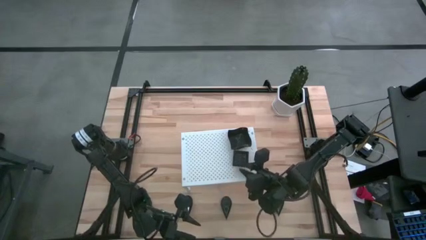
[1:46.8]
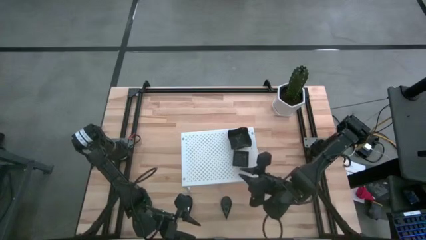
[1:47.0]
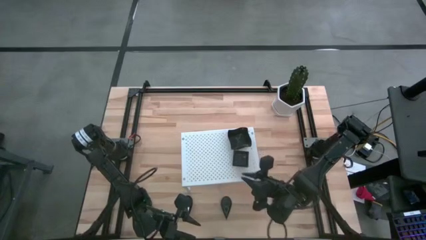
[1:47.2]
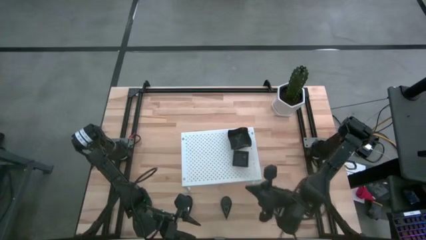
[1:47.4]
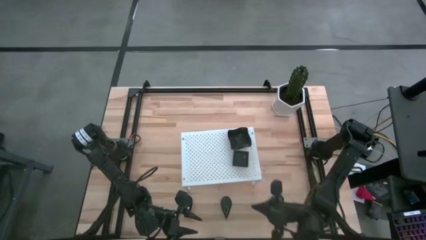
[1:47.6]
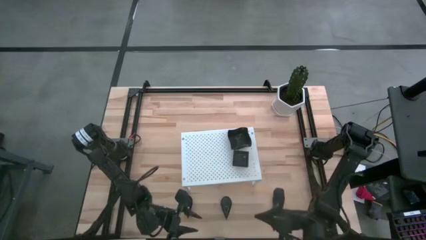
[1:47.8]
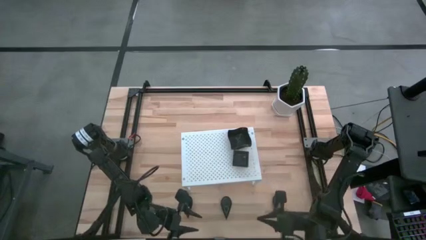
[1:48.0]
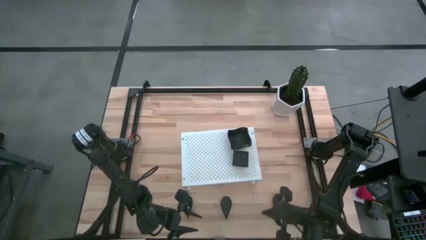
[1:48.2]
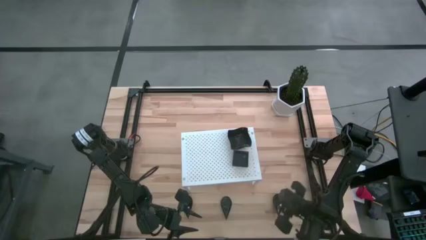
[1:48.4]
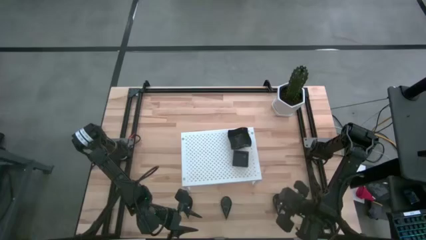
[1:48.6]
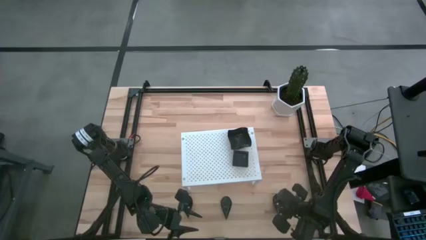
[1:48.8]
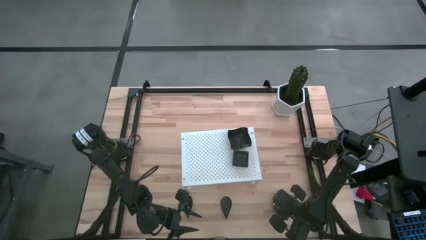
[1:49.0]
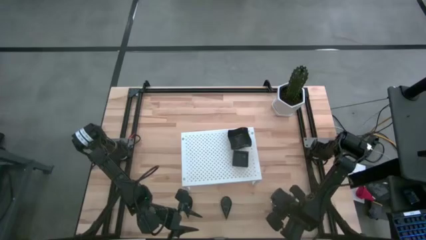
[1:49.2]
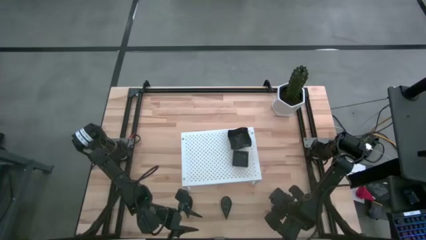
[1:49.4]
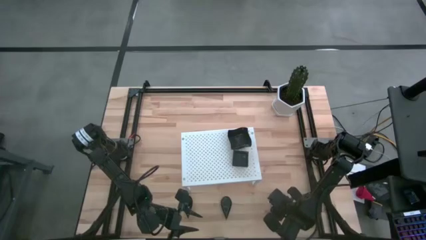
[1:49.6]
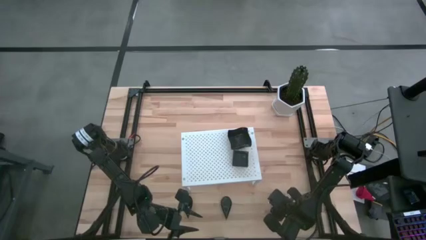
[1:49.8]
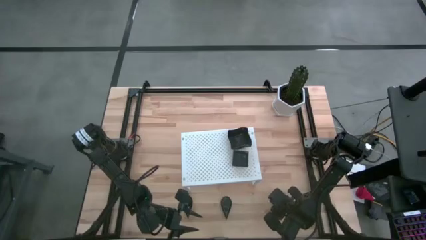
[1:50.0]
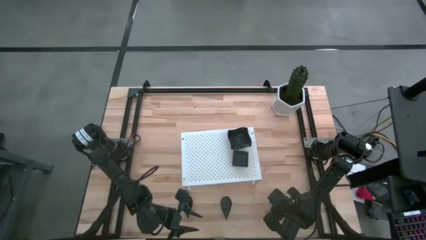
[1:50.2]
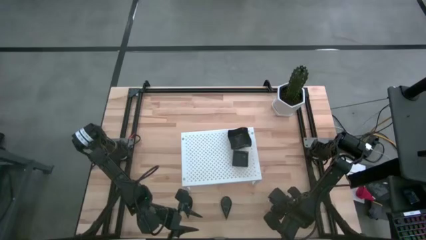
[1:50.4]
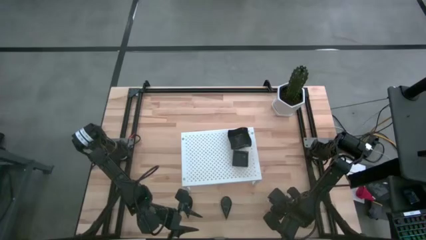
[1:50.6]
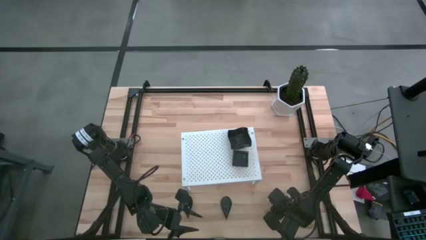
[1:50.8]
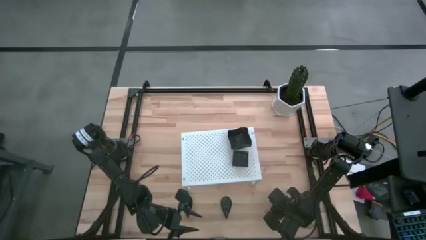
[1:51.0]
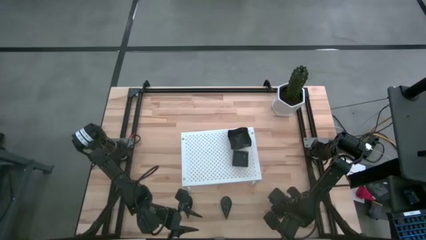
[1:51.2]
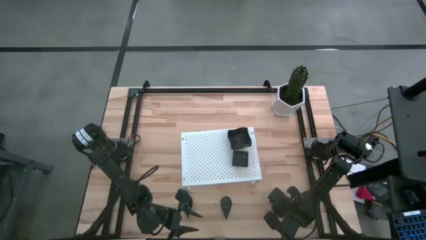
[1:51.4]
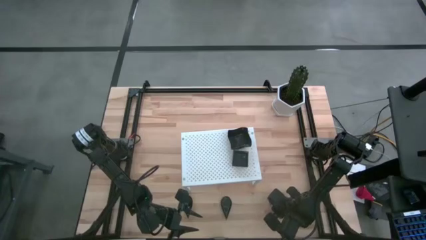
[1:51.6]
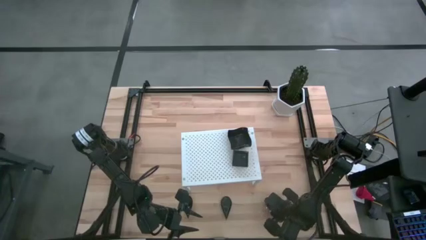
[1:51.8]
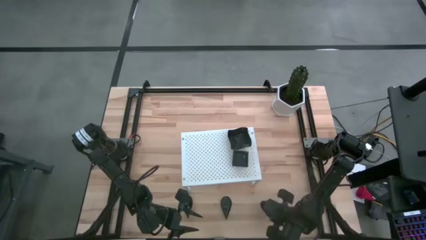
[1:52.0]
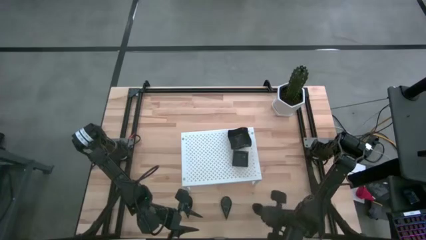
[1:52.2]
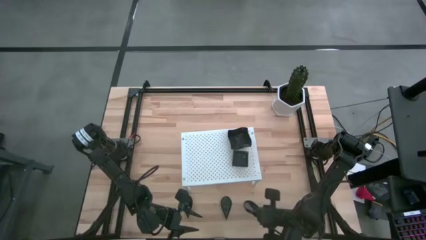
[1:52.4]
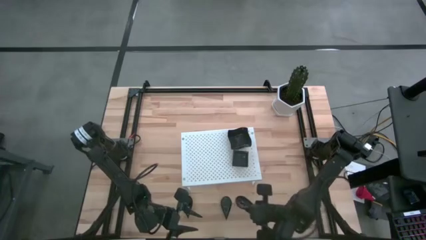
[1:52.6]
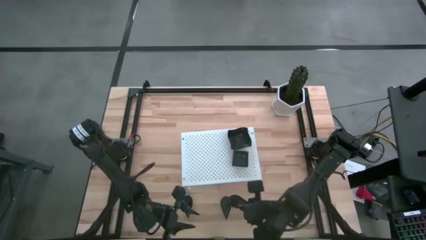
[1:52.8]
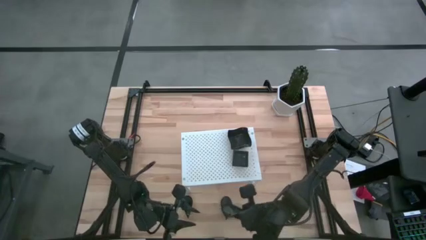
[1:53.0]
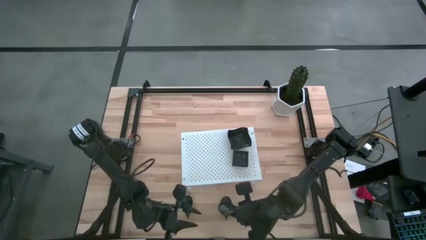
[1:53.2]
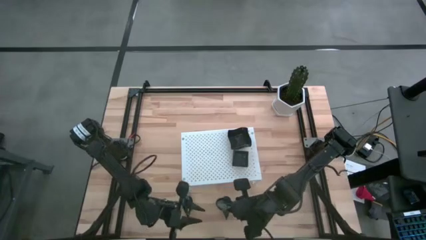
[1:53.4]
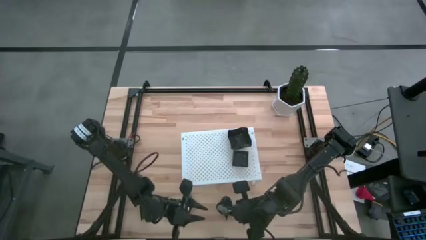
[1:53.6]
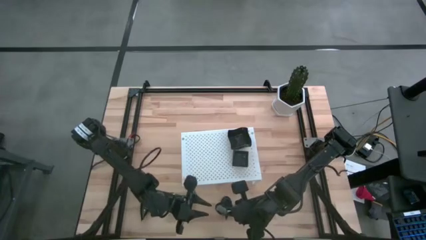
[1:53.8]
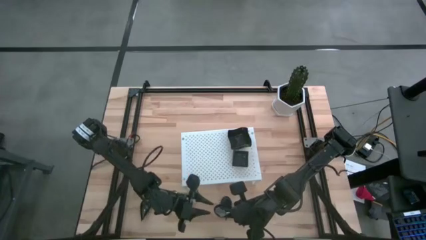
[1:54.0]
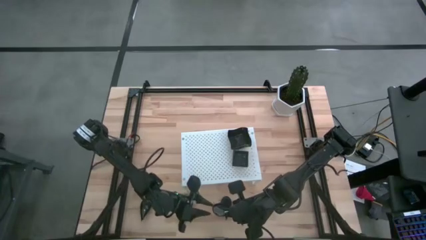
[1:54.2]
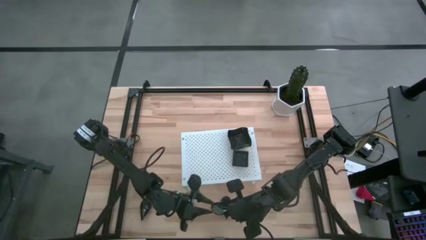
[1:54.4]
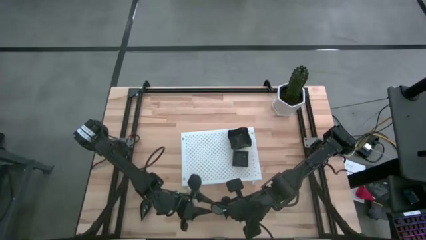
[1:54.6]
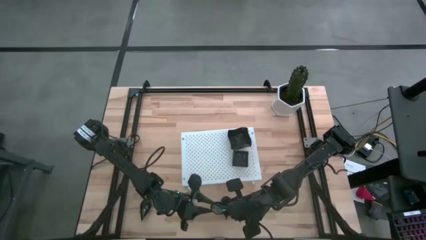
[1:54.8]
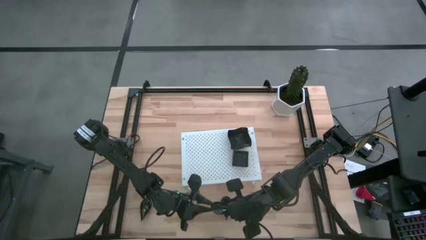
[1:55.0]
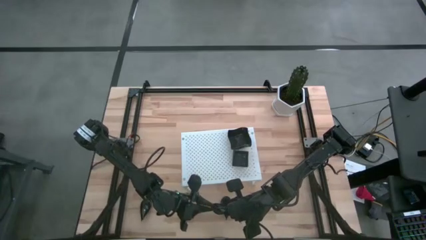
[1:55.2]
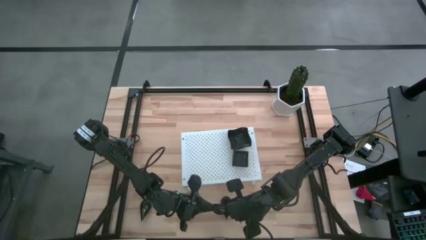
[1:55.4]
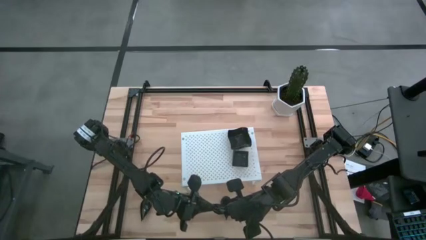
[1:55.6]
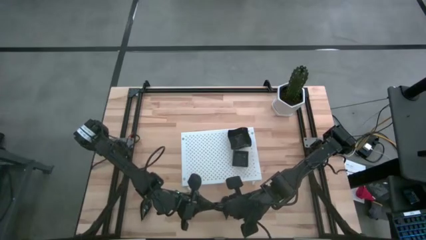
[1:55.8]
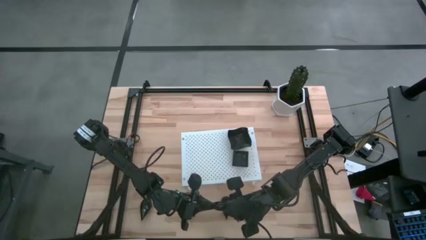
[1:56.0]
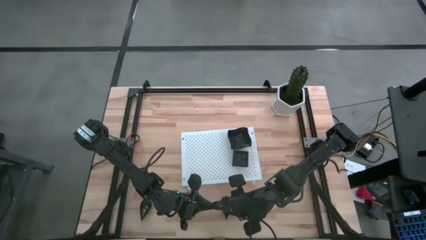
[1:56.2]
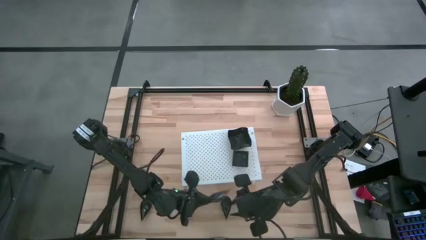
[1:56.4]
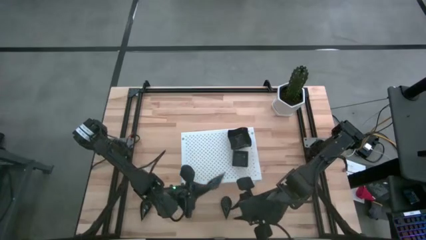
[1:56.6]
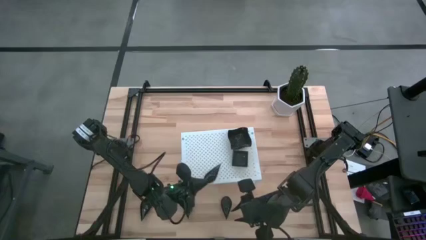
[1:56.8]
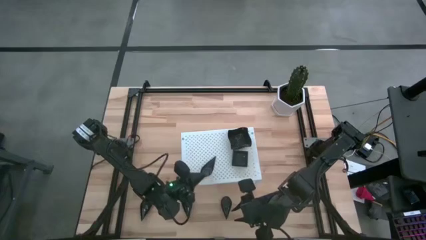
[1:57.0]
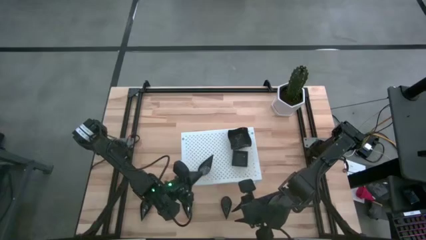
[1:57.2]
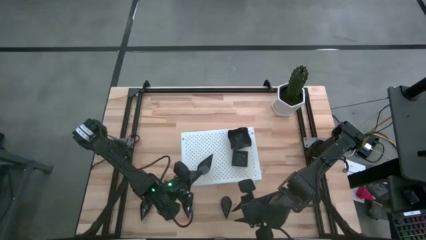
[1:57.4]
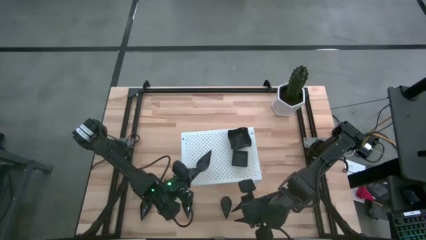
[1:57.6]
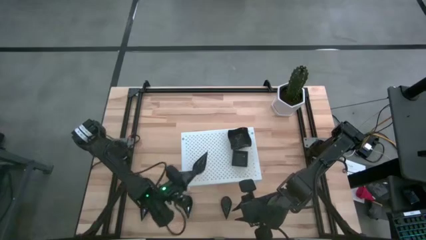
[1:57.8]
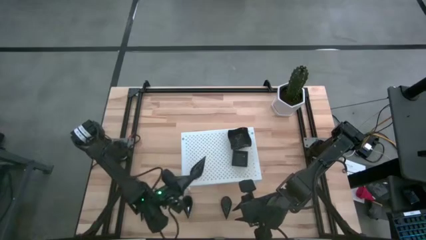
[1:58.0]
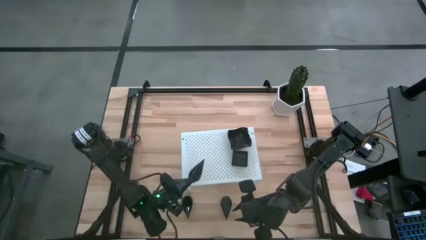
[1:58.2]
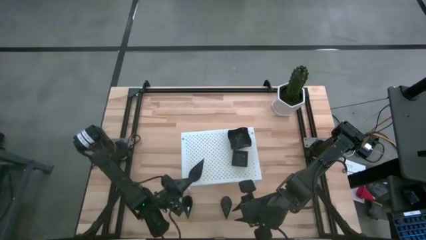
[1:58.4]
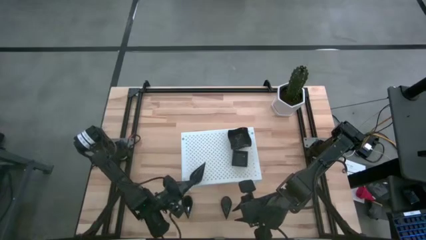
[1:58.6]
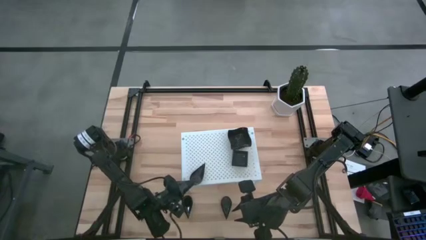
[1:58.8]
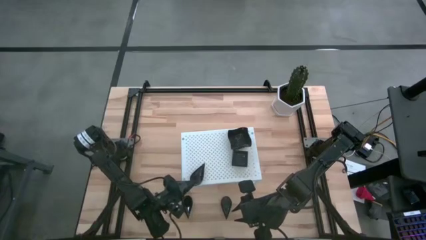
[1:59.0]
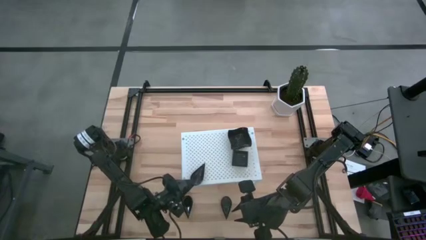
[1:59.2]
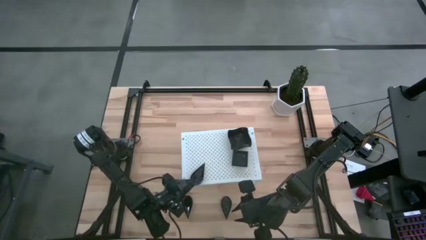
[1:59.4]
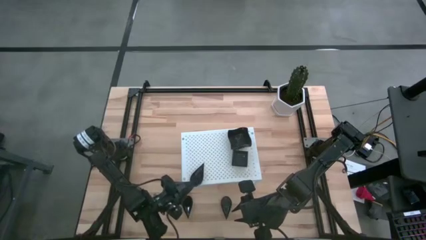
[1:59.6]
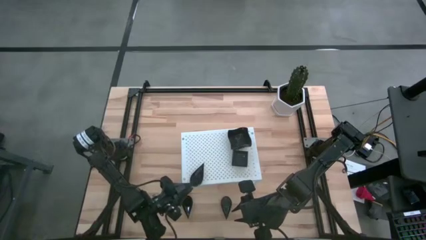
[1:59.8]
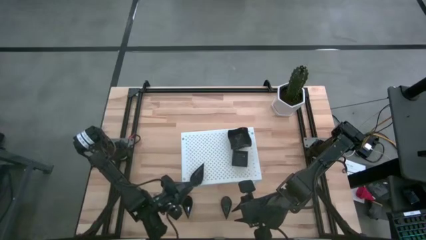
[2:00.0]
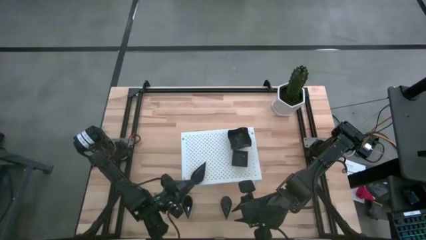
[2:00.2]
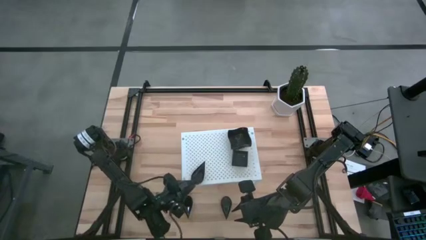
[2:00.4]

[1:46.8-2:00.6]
Task: Pick & Place Mini shaped plates
Put the drop-shaped plate on the shelf

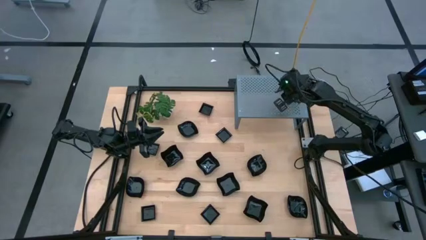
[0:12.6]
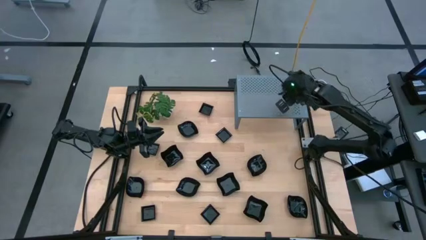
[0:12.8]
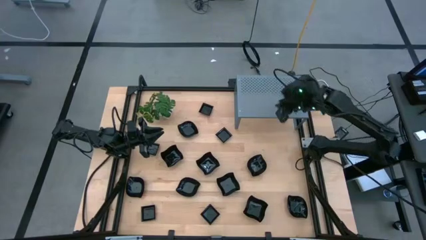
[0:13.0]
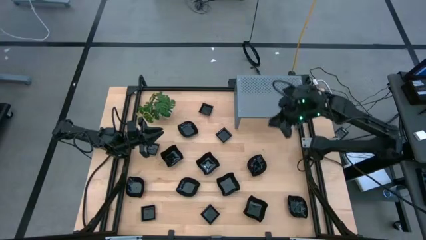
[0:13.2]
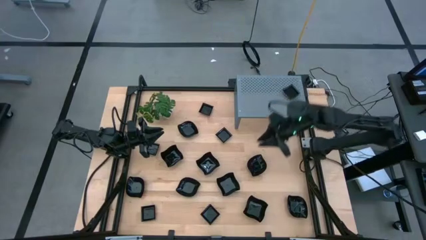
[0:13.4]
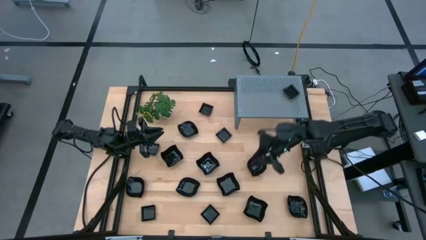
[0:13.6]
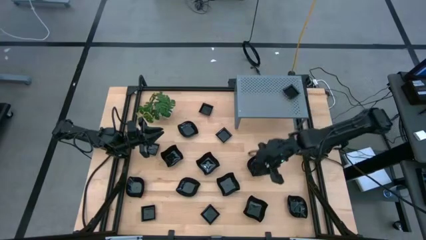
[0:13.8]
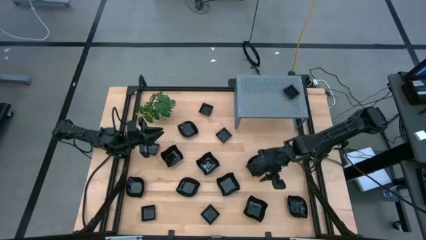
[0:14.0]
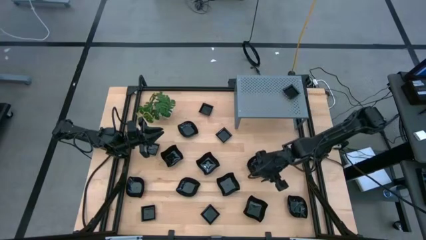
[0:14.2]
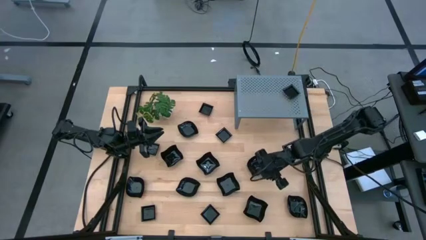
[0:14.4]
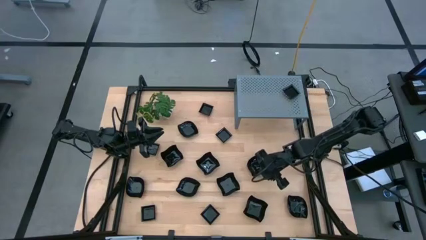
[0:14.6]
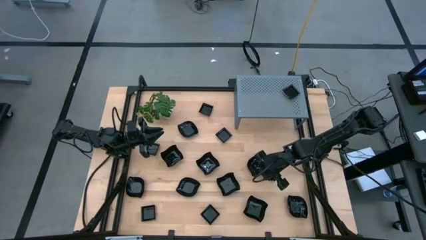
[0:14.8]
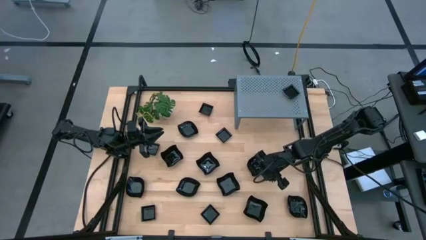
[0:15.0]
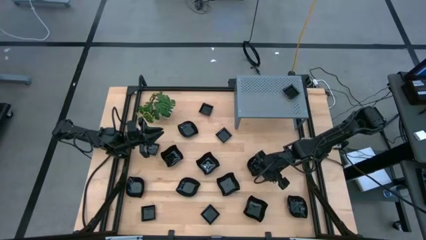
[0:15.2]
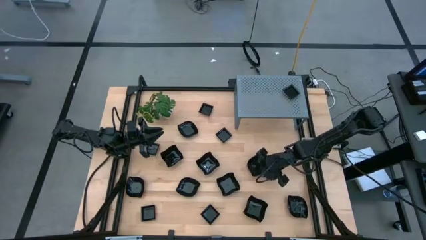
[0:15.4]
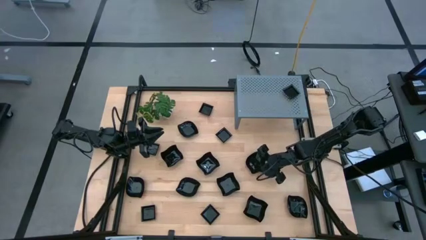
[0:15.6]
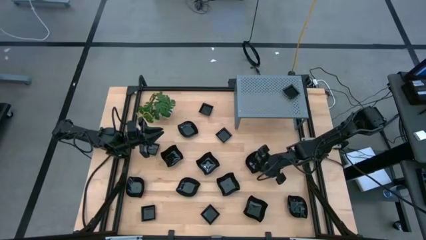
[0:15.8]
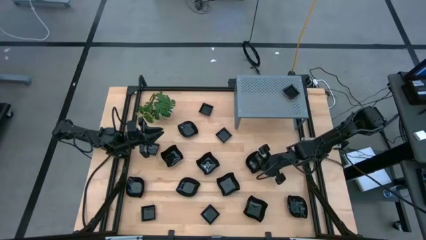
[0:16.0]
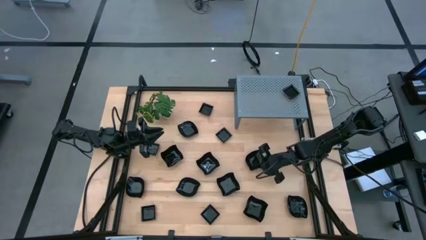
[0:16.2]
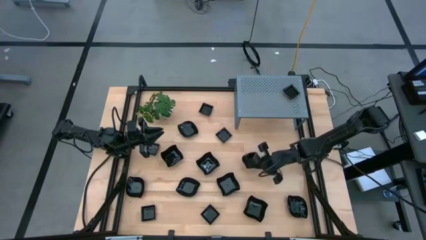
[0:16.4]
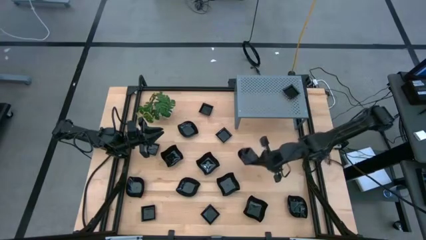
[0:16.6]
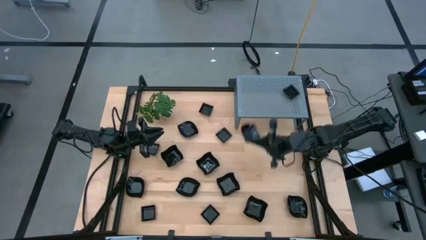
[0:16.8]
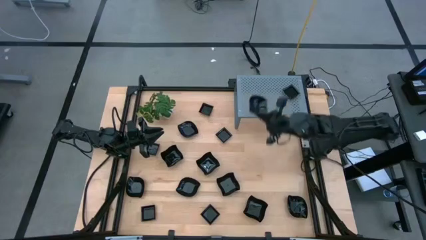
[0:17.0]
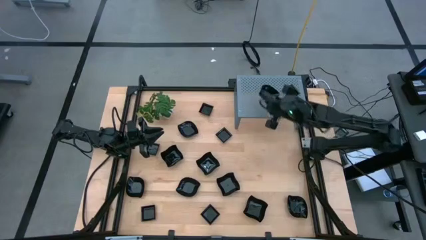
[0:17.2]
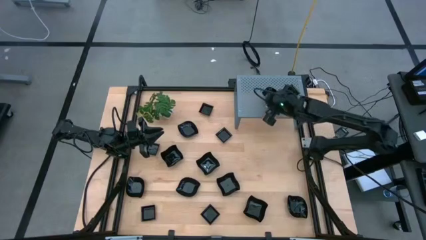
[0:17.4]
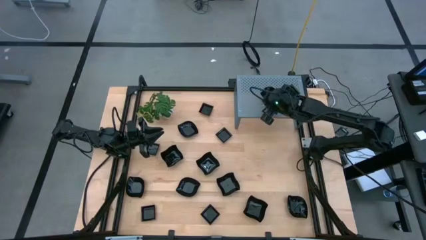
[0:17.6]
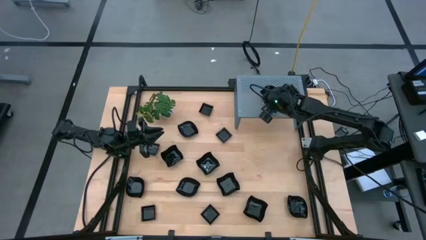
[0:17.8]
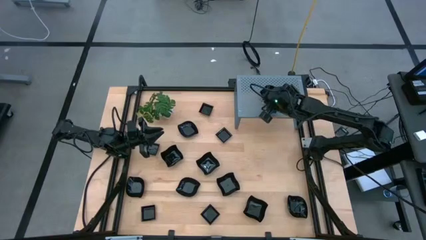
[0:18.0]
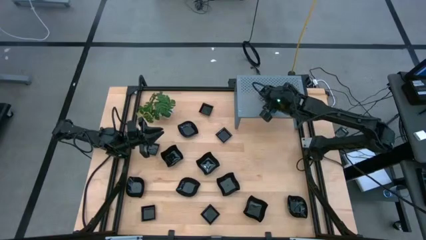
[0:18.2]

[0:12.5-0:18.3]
Task: Pick & Place Mini shaped plates
Put the leaf shaped plate on the shelf
